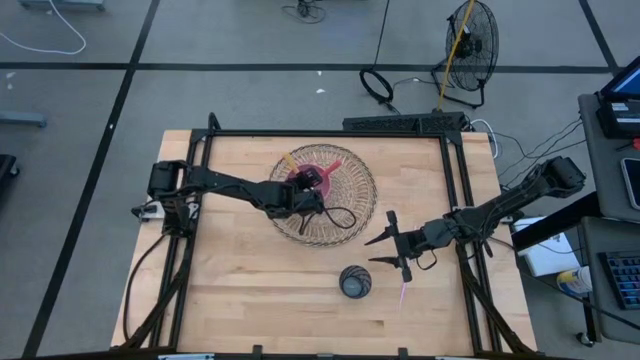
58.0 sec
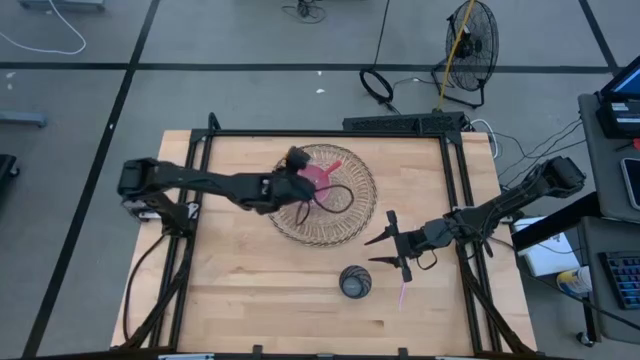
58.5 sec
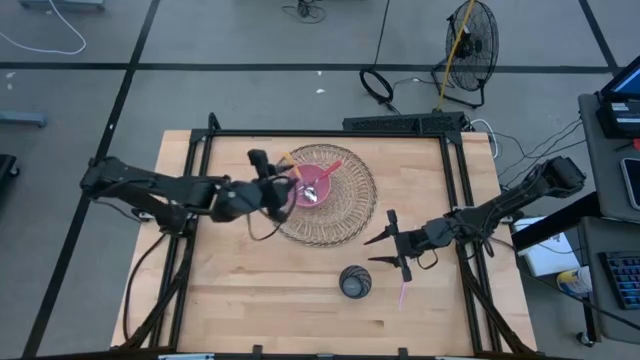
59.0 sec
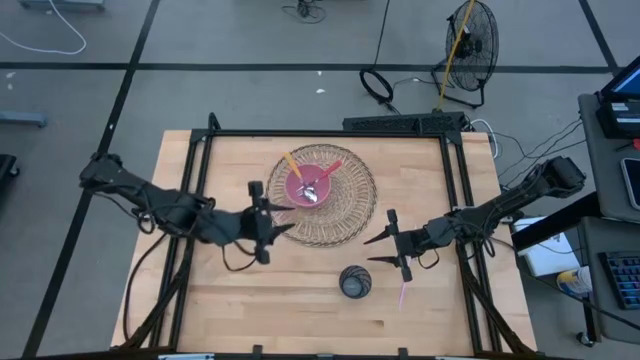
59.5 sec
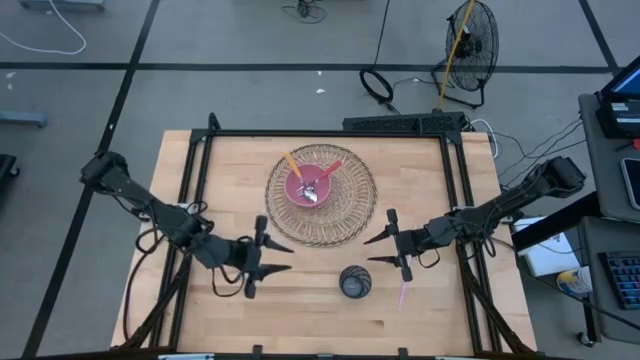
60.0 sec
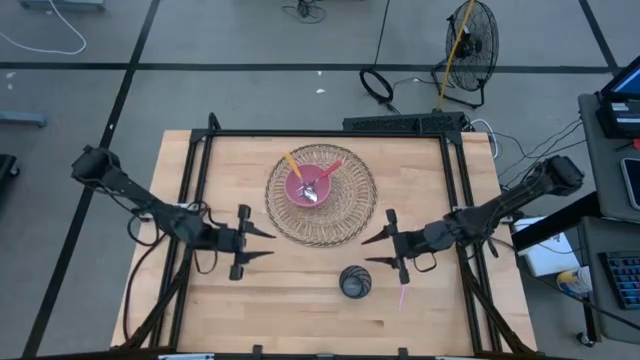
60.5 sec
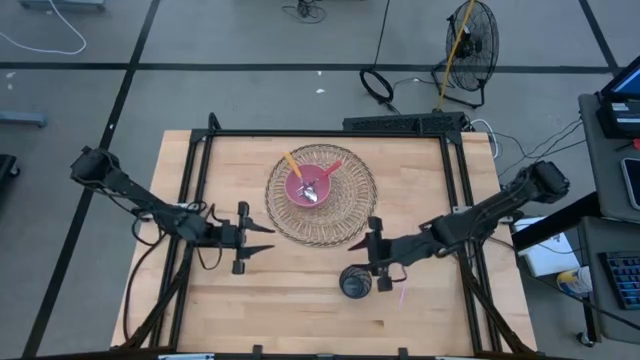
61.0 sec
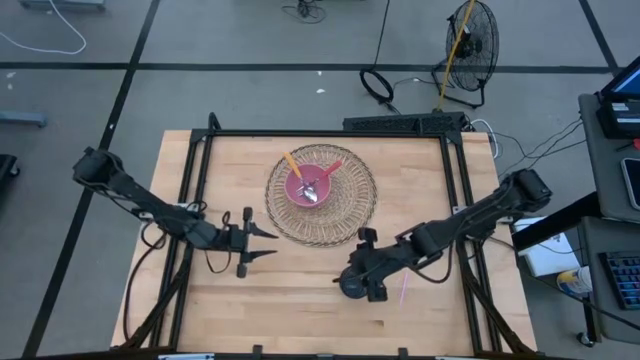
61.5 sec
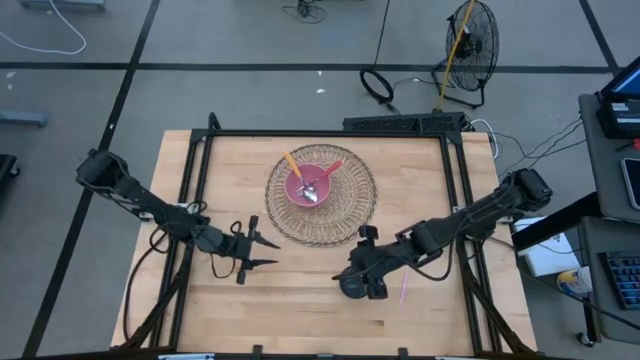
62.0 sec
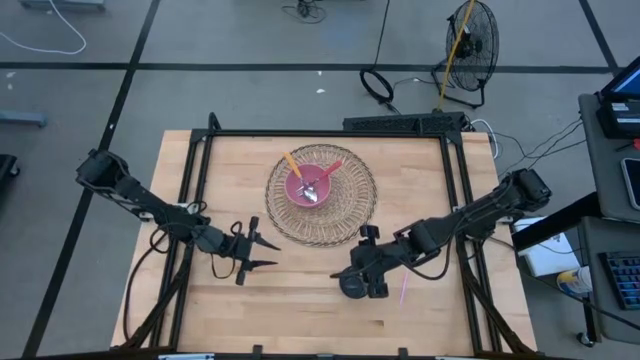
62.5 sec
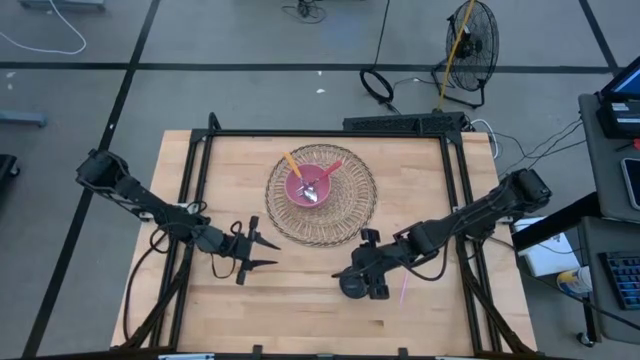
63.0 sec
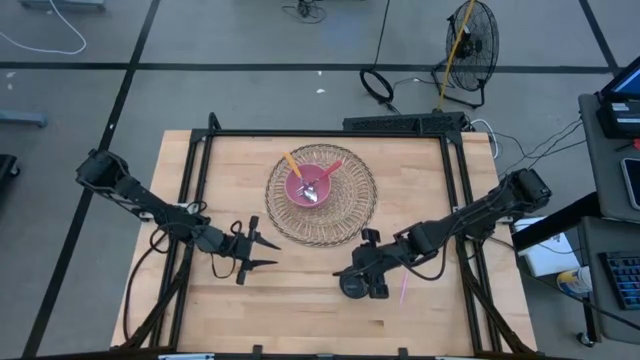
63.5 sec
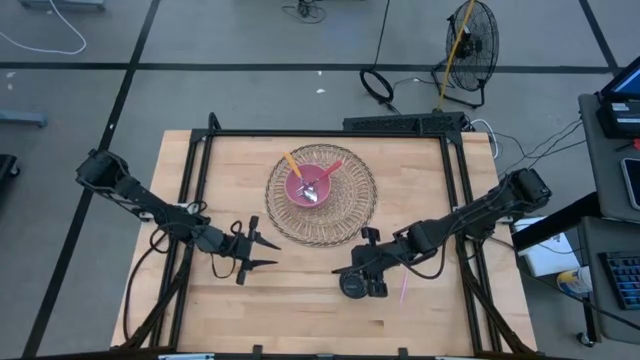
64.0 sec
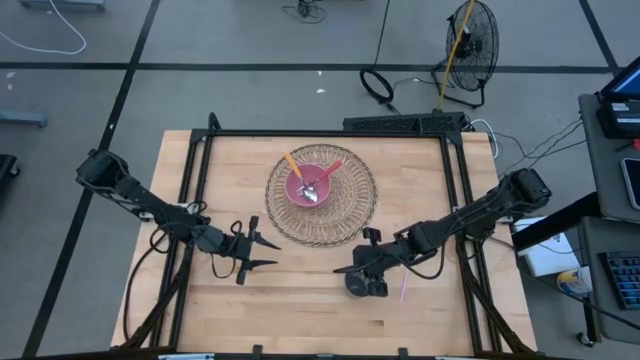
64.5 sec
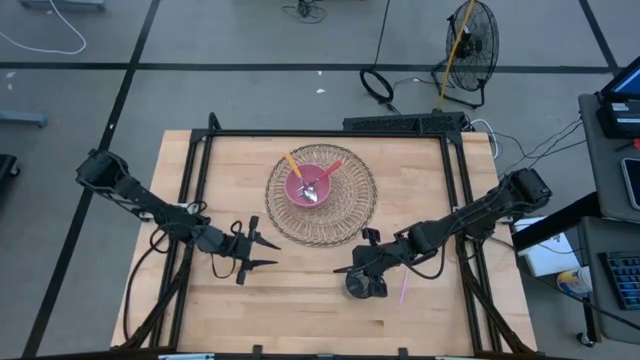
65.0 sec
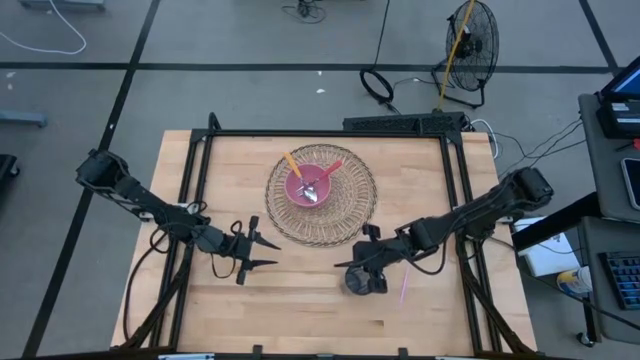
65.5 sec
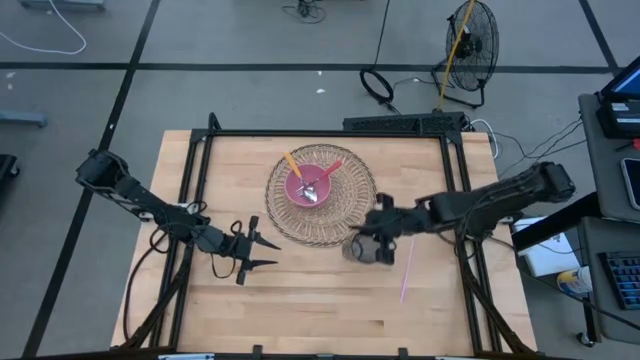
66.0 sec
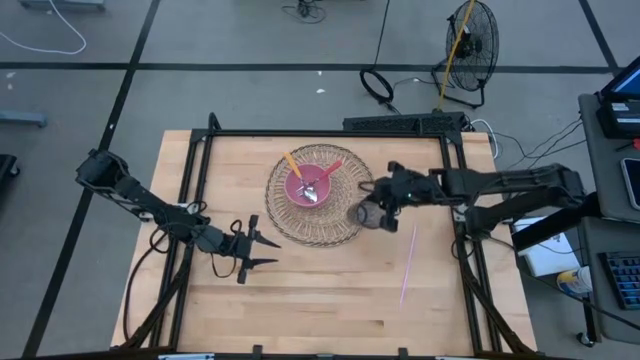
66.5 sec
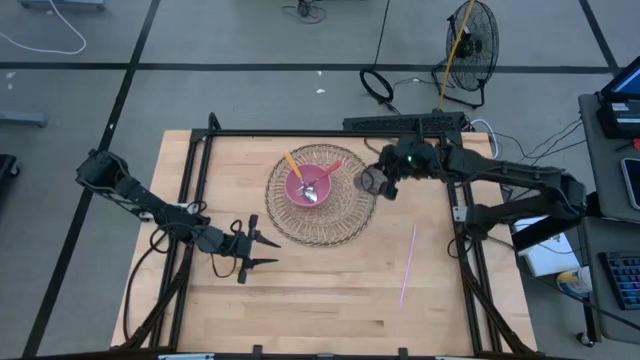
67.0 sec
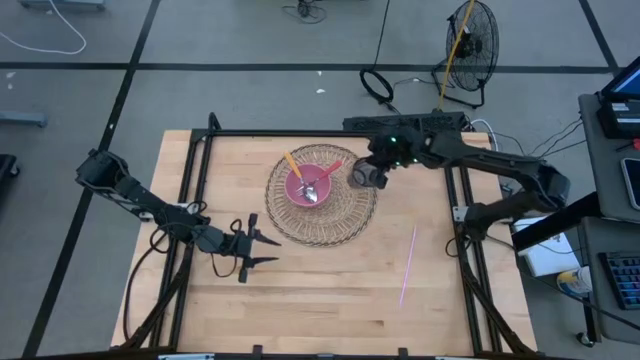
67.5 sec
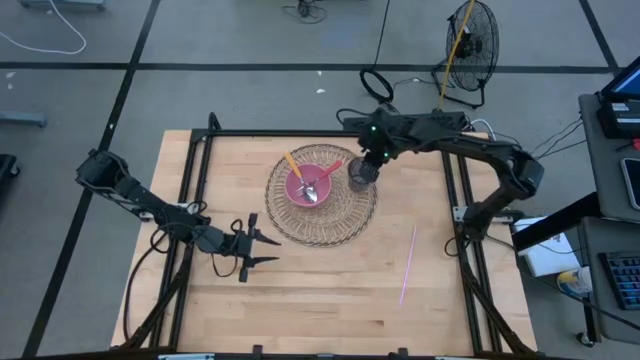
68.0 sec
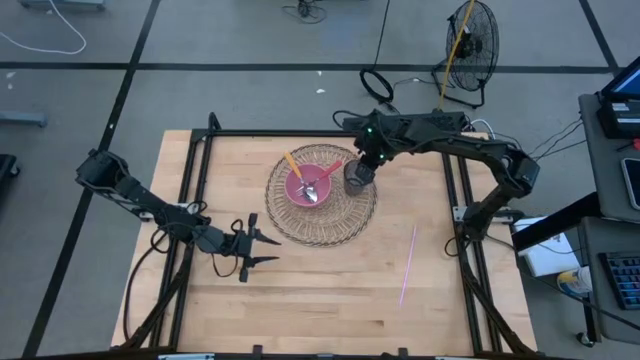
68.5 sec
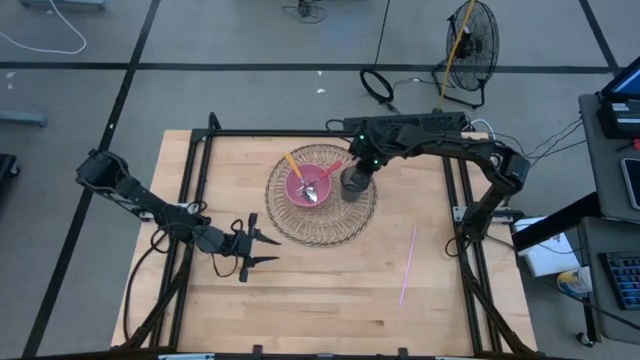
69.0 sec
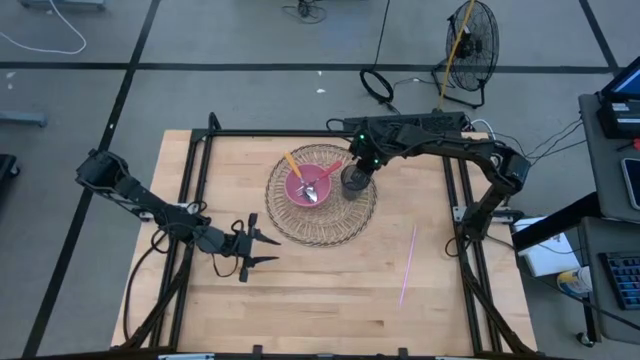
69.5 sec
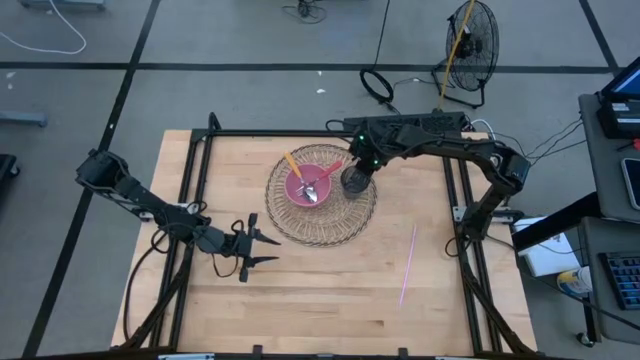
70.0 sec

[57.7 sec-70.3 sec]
Task: Pick & Place Utensil
Put the blue cup on the woven mat to the right of the pink bowl

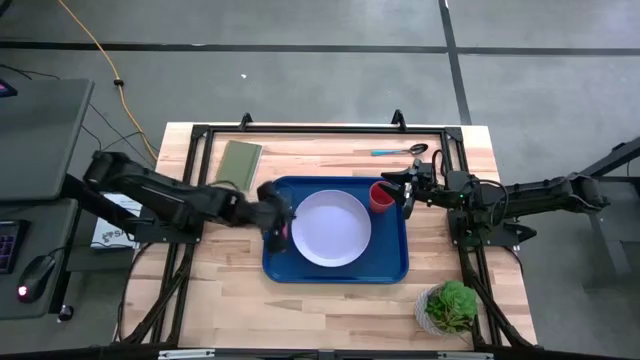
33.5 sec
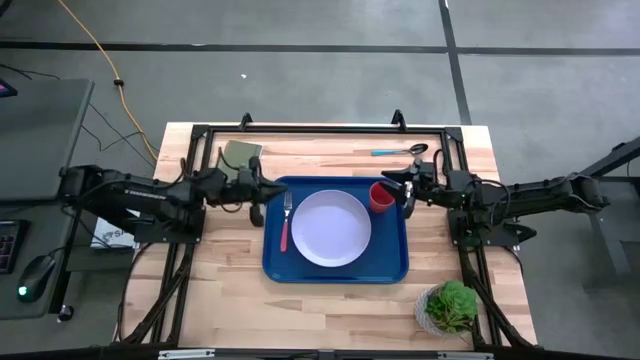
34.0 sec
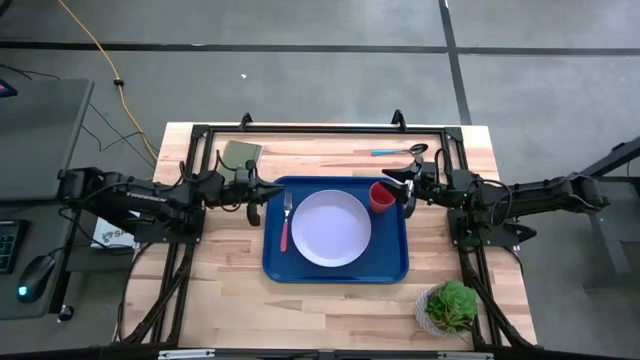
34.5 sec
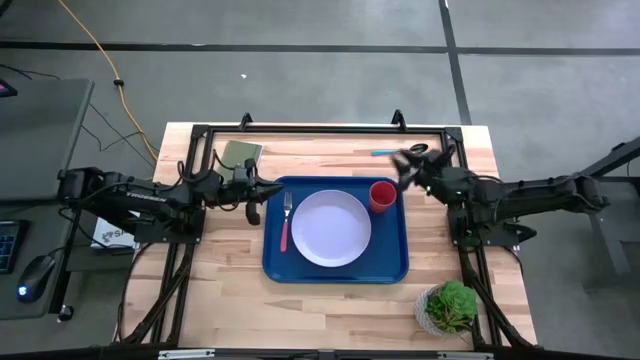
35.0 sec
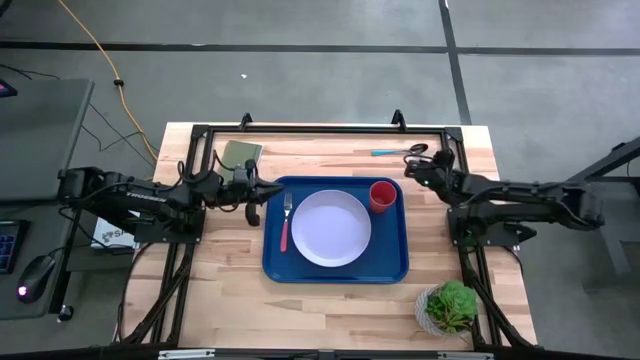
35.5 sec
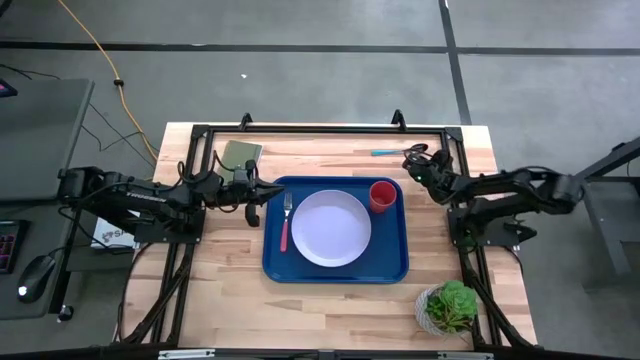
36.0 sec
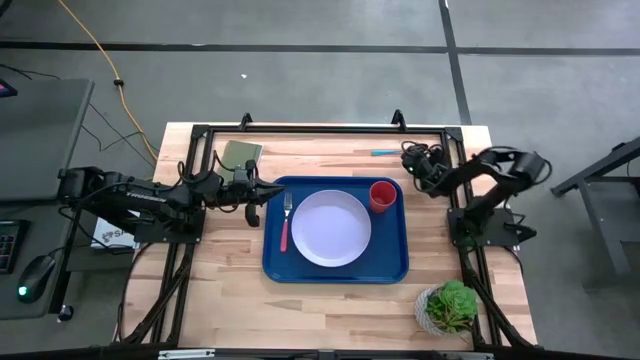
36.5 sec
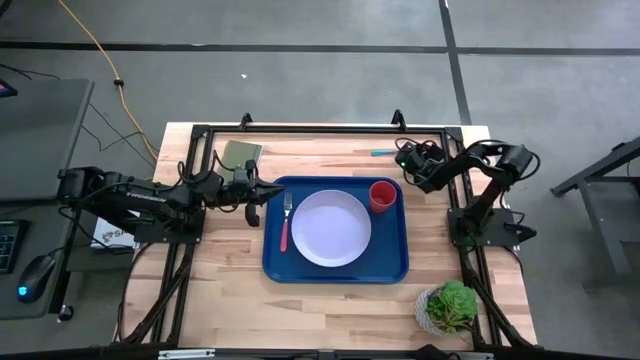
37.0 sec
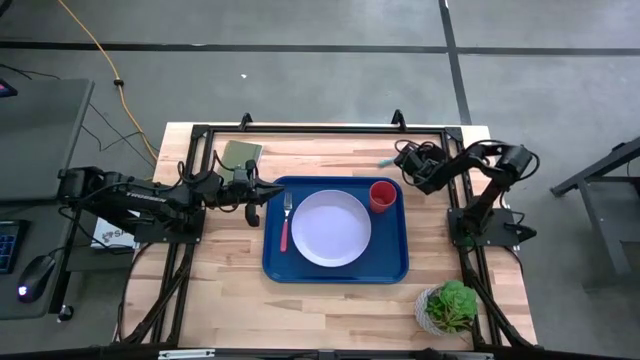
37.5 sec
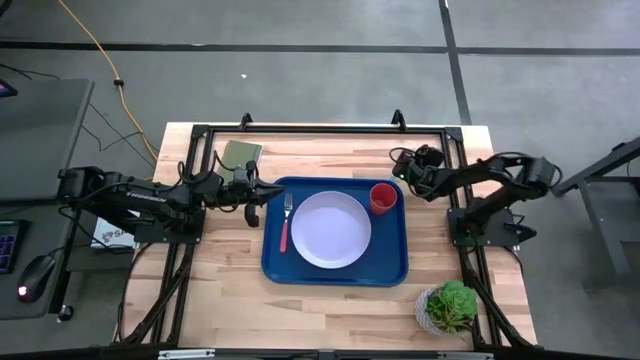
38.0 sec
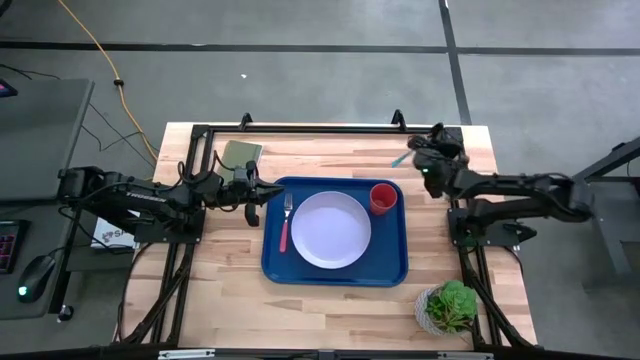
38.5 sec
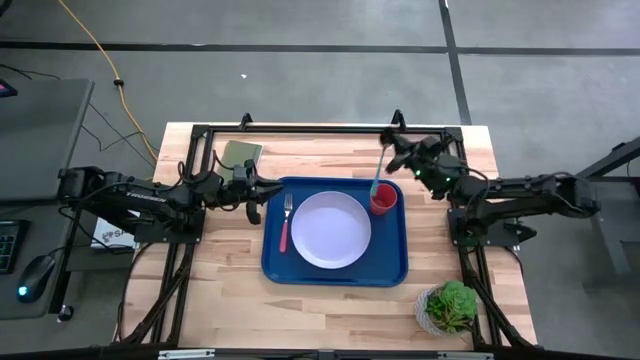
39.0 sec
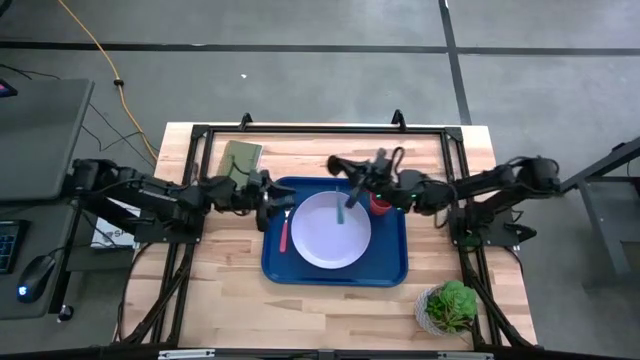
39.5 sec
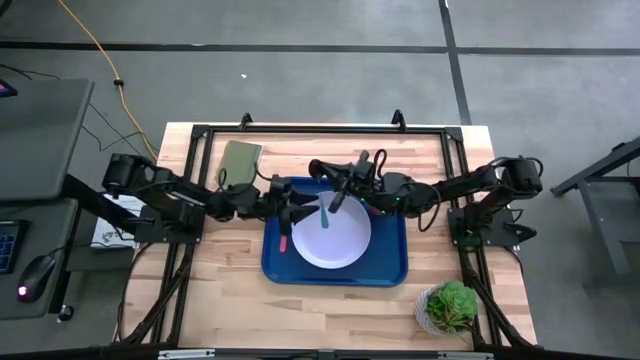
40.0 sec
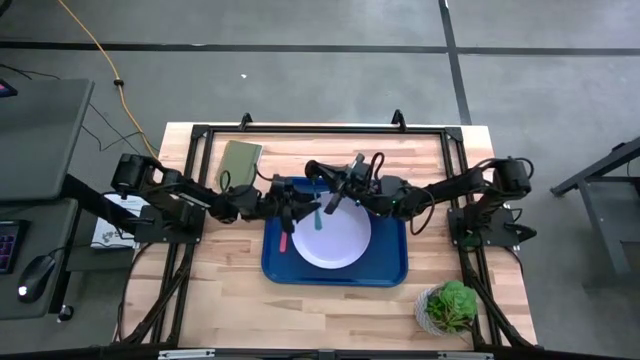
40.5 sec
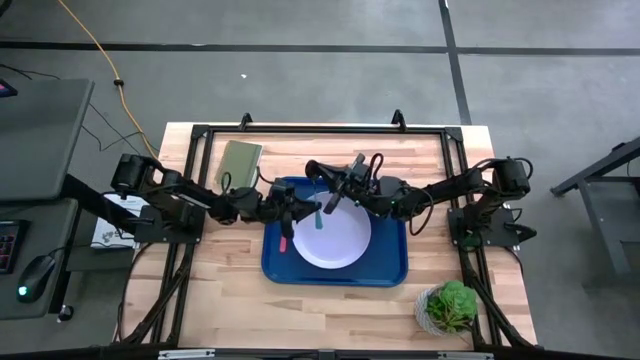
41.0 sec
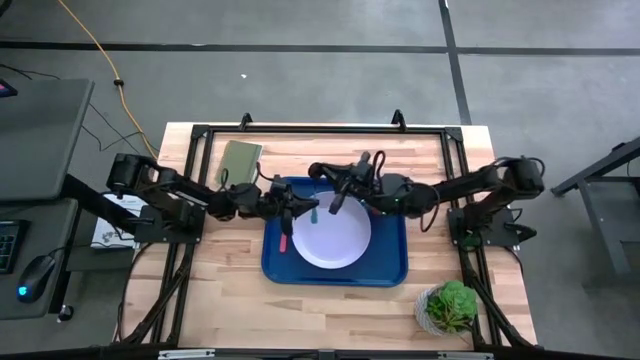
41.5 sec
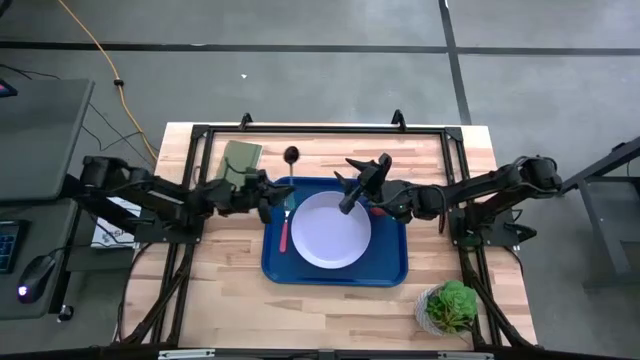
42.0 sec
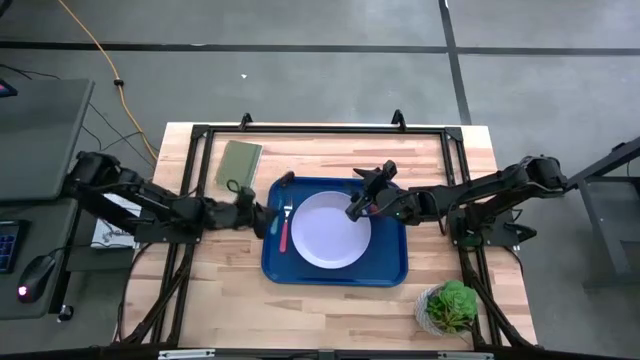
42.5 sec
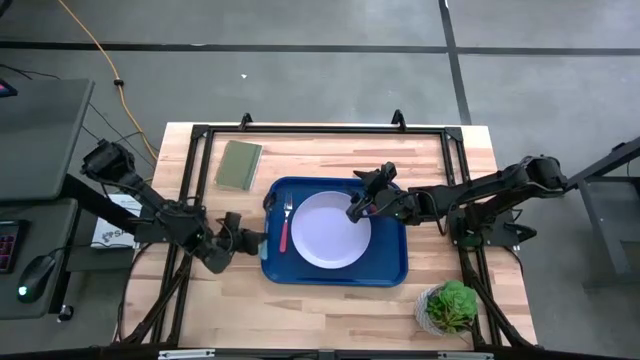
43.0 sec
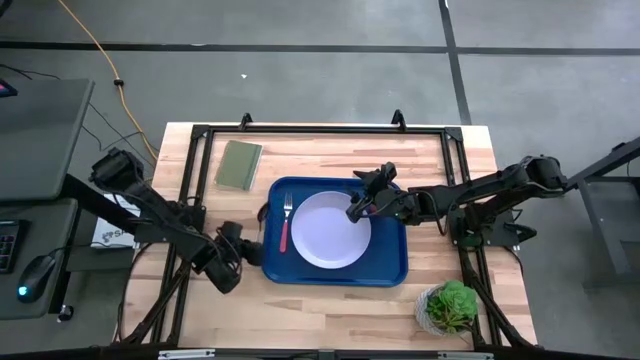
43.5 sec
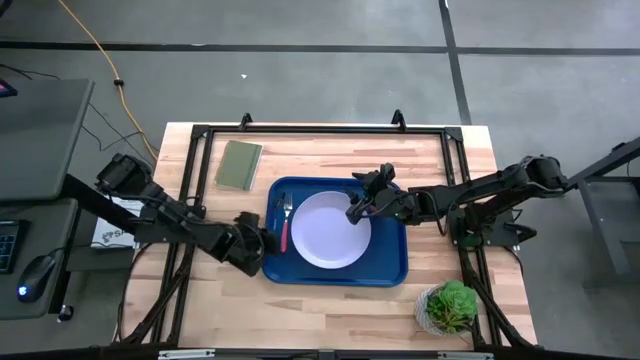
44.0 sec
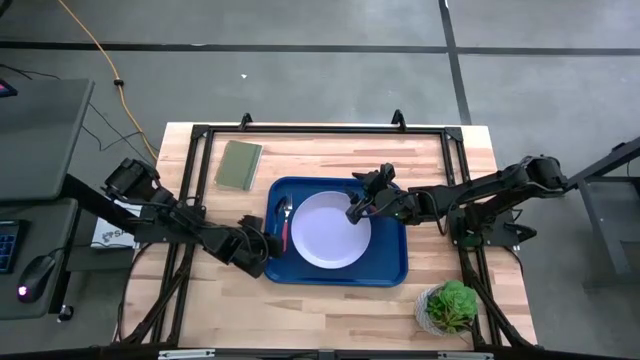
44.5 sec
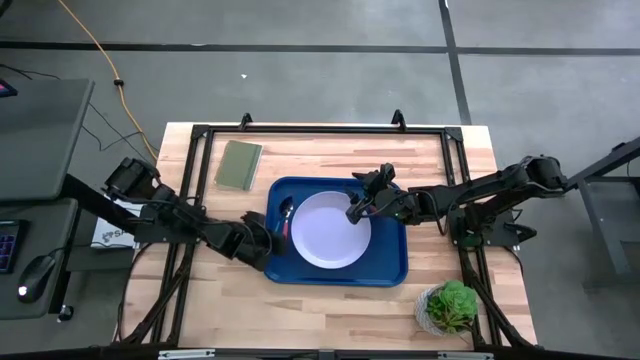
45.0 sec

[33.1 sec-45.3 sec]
Task: Pick and place plate/cup/fork/spoon on tray
Put the blue spoon on the blue serving tray to the left of the red fork
